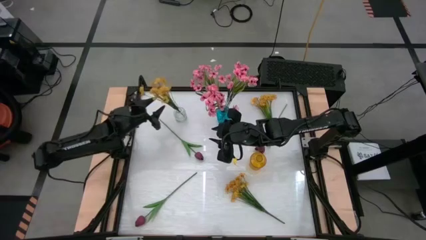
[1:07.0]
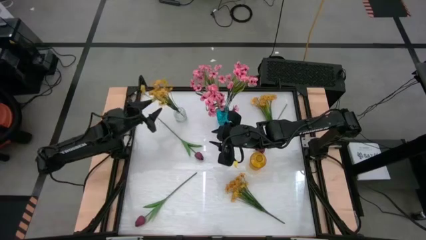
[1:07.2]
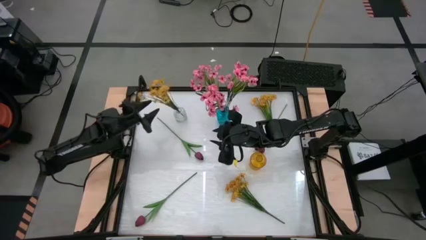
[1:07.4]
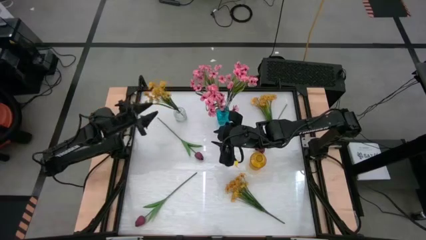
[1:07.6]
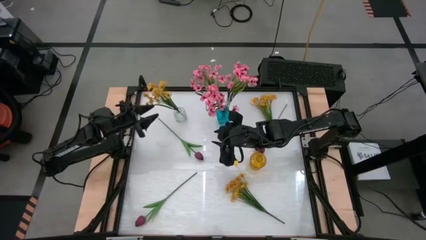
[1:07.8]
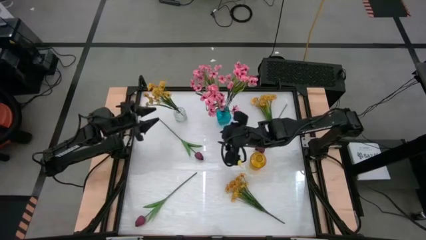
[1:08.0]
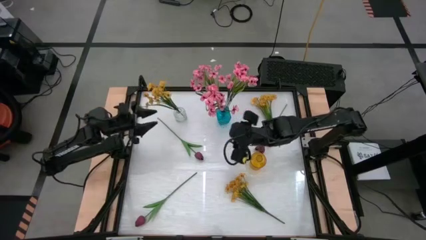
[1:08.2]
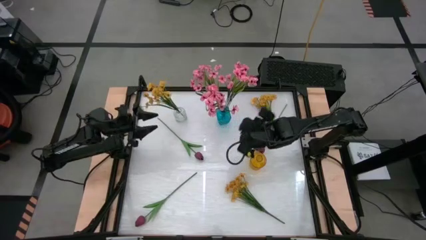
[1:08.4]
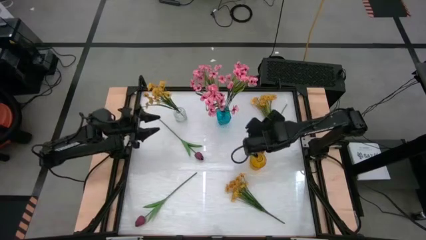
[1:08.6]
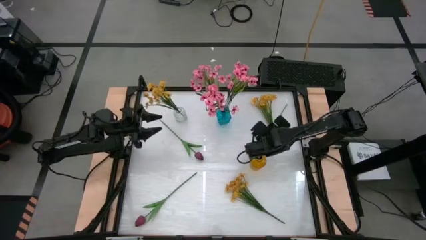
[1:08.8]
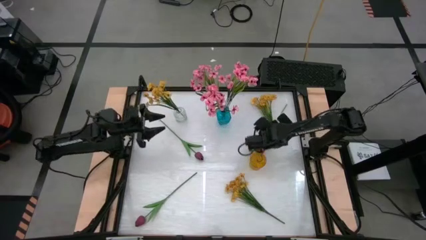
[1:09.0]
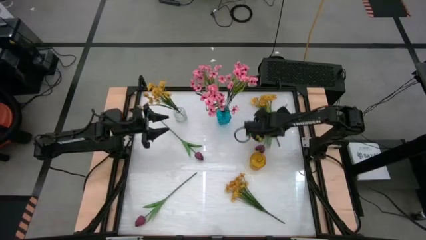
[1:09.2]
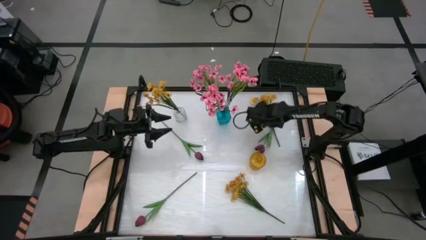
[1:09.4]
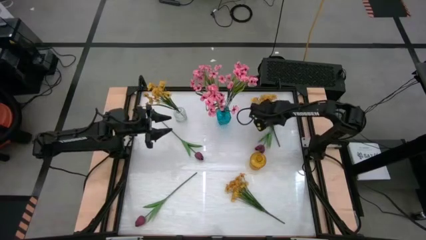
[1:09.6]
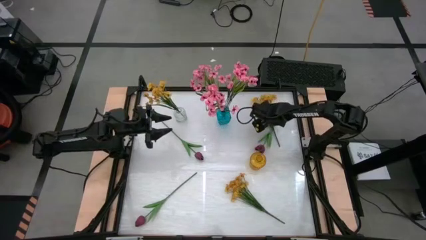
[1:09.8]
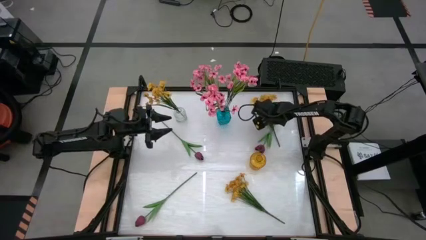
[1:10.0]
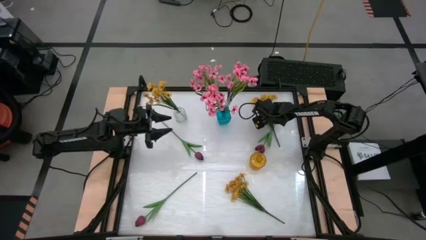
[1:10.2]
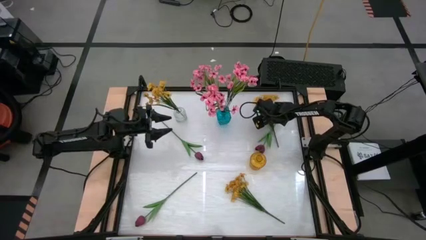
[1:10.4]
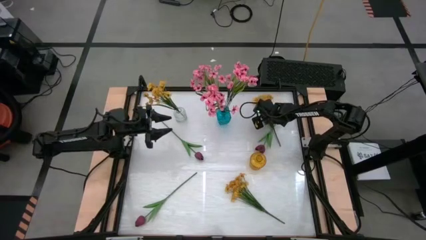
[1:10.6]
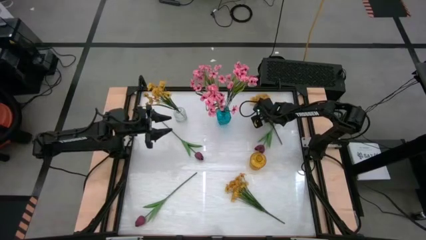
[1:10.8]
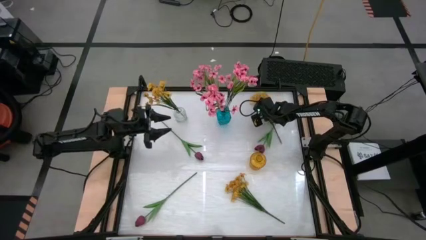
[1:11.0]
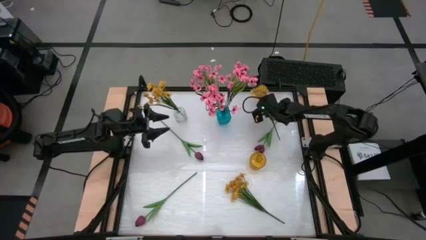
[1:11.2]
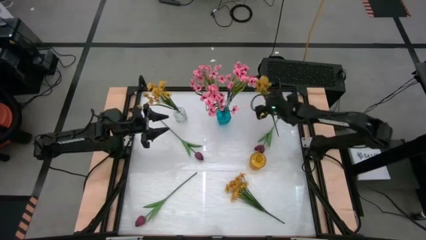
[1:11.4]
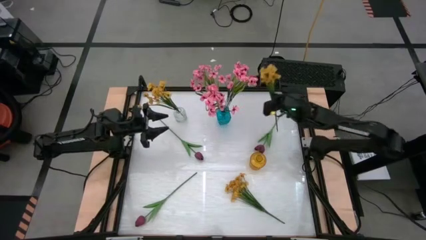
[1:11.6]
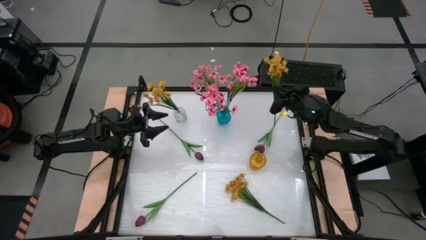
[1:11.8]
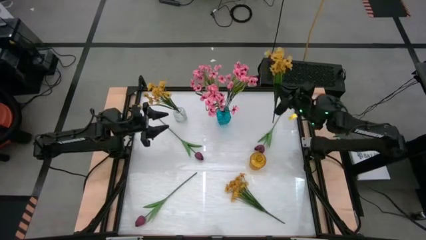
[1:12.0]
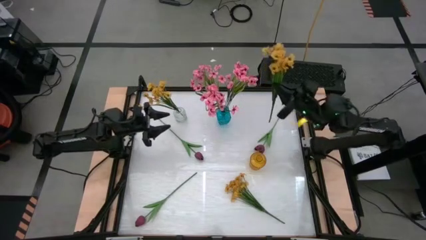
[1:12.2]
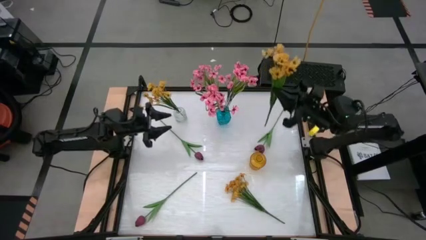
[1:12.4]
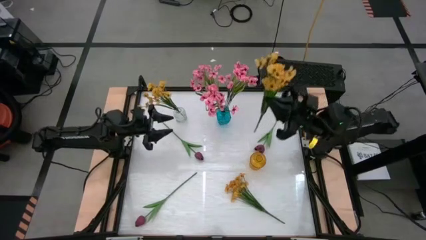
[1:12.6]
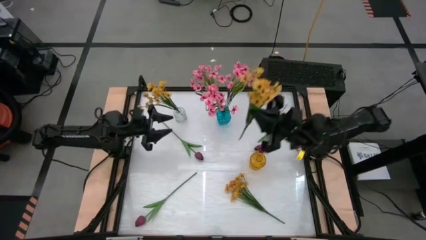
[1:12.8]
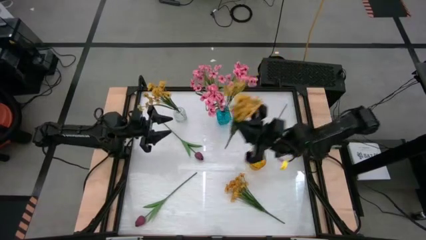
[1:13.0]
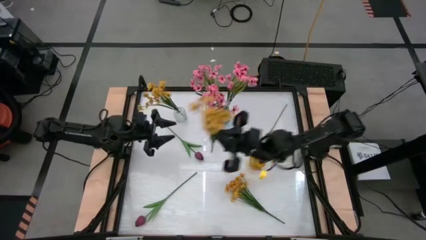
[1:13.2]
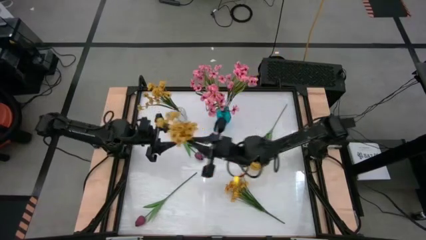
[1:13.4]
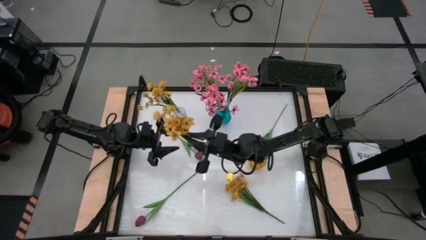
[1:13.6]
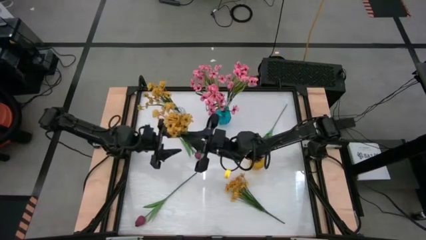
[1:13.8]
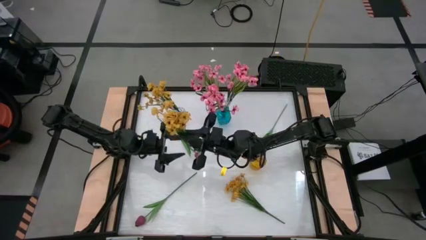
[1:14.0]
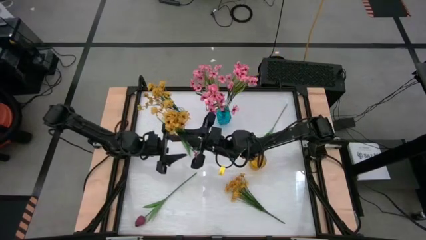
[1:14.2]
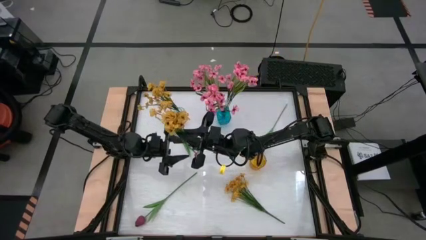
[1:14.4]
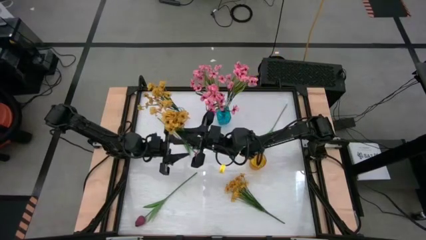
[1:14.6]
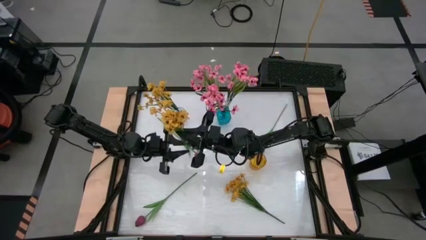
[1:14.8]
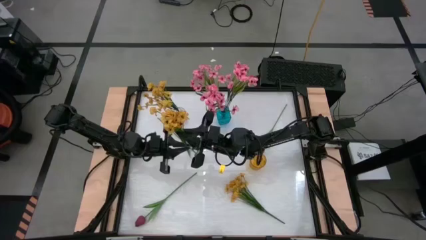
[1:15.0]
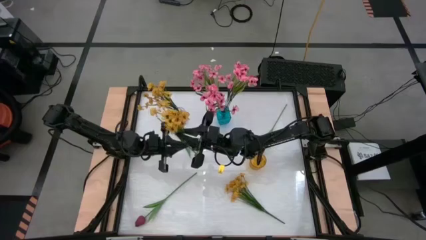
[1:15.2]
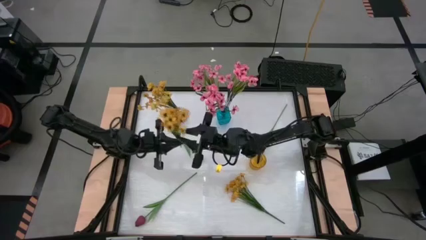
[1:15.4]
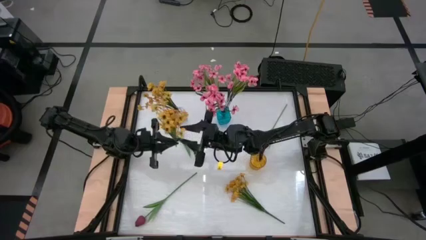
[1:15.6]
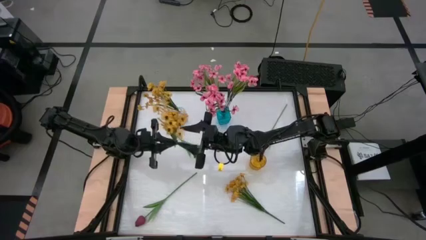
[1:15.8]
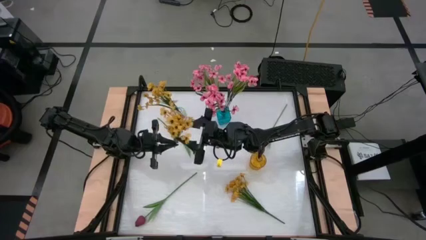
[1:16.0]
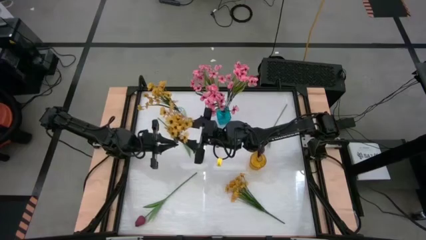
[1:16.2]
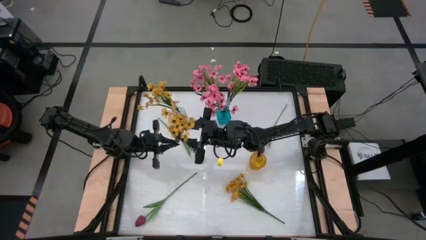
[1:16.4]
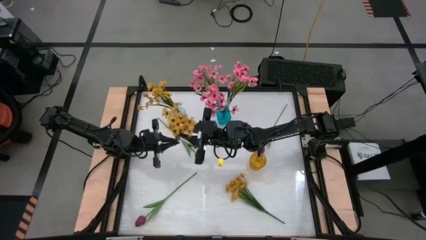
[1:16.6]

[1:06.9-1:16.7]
Task: Sort flowers into vase by color
Put the top yellow flowers into the transparent vase

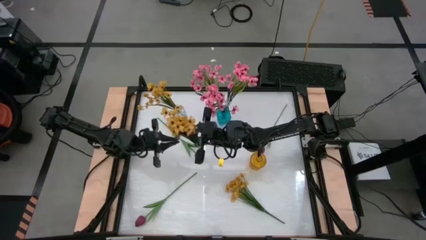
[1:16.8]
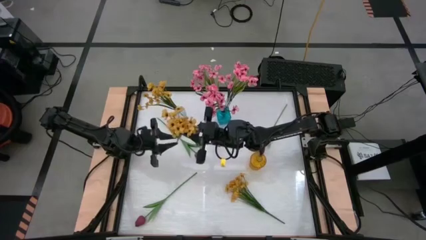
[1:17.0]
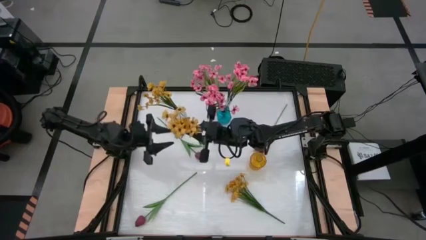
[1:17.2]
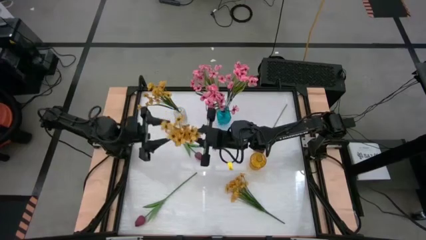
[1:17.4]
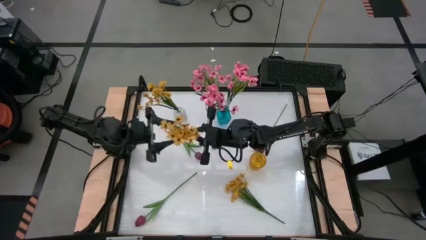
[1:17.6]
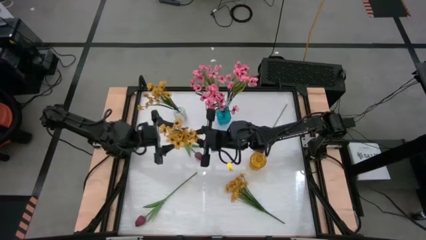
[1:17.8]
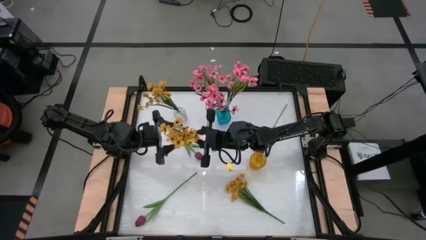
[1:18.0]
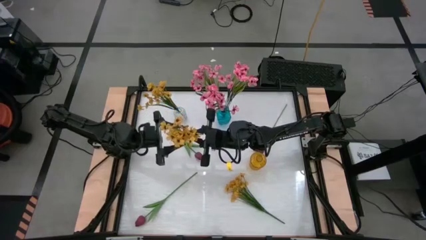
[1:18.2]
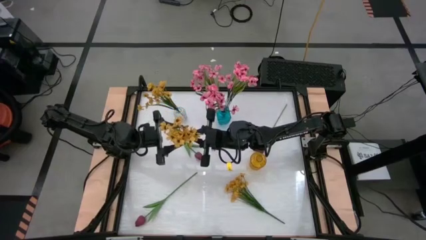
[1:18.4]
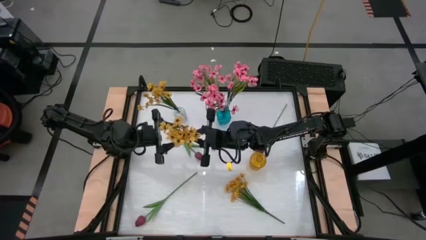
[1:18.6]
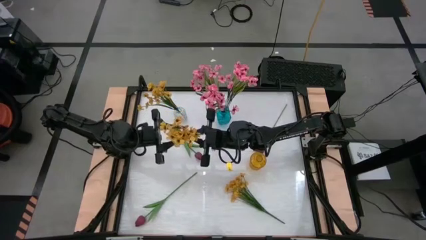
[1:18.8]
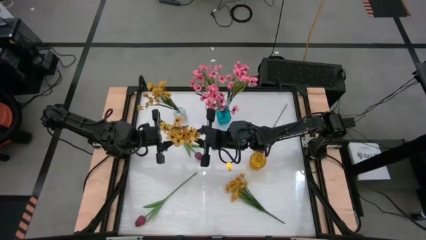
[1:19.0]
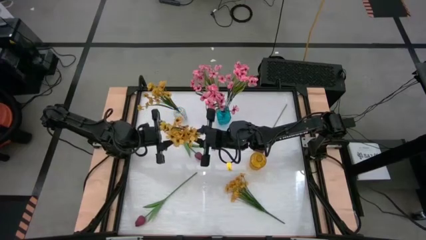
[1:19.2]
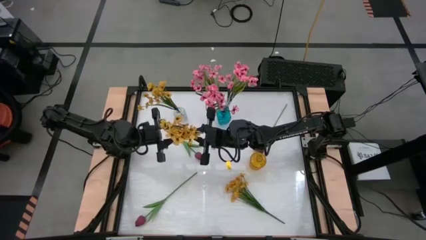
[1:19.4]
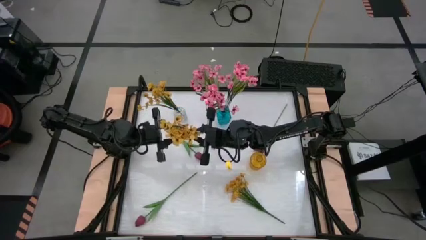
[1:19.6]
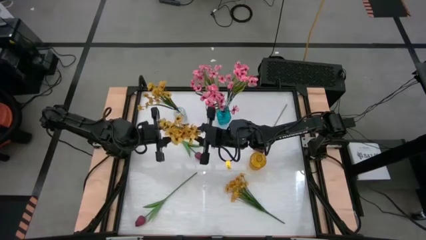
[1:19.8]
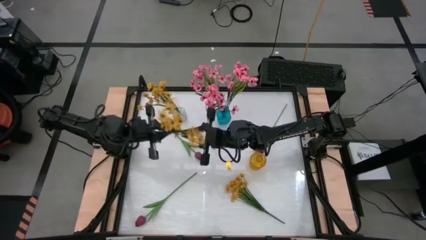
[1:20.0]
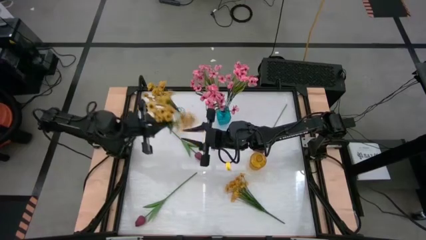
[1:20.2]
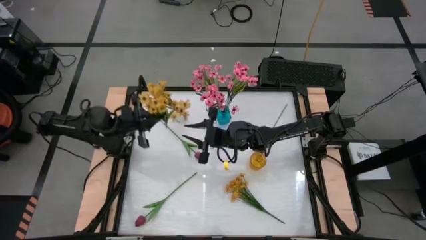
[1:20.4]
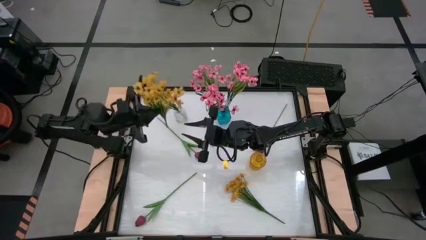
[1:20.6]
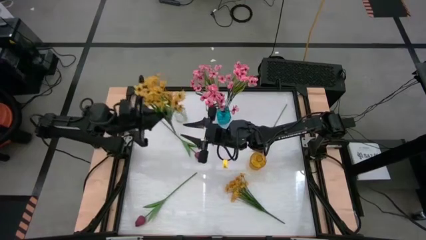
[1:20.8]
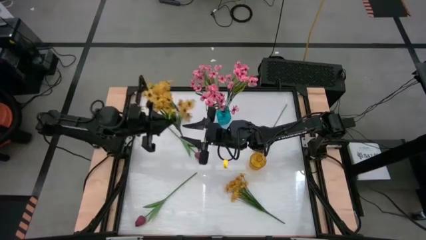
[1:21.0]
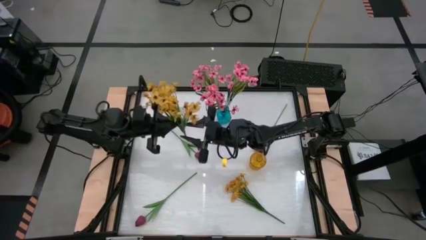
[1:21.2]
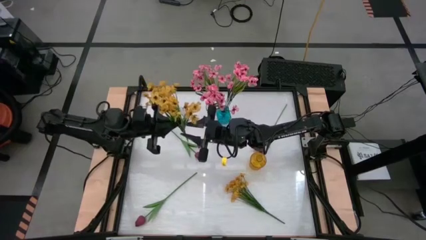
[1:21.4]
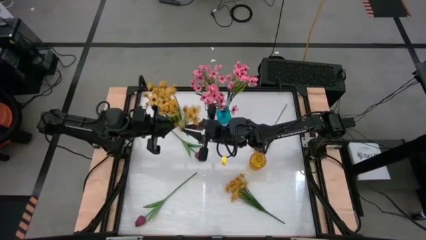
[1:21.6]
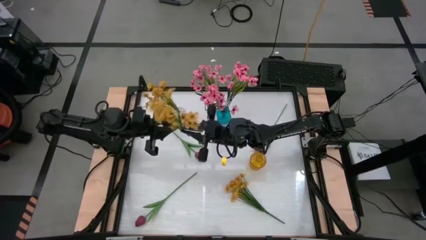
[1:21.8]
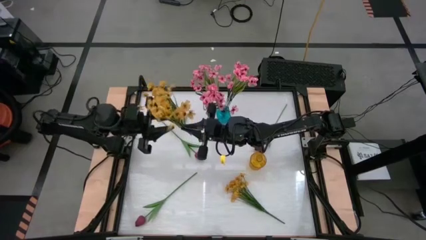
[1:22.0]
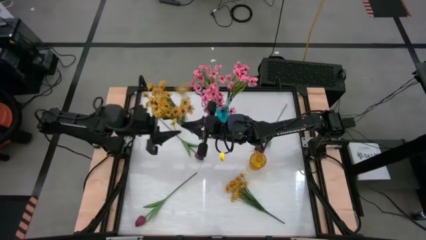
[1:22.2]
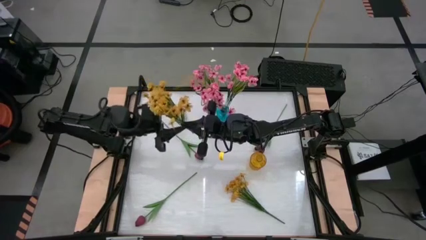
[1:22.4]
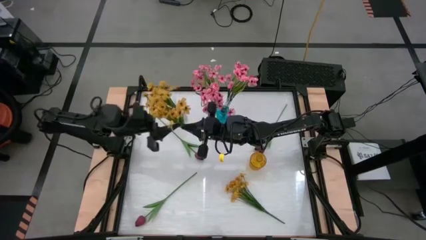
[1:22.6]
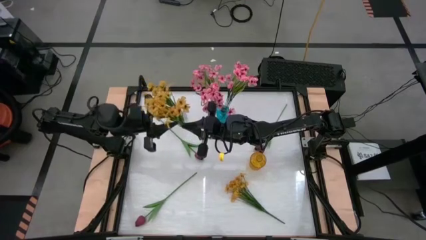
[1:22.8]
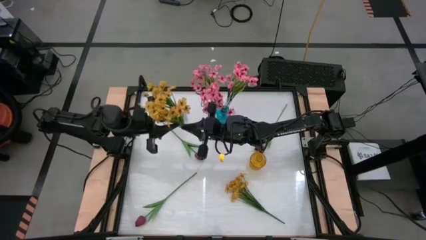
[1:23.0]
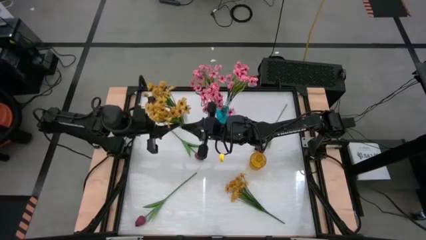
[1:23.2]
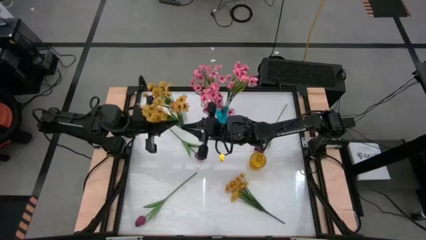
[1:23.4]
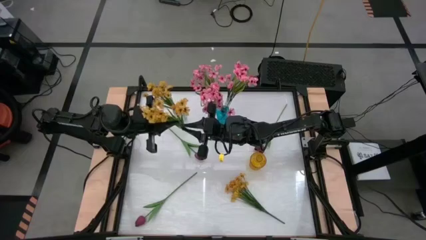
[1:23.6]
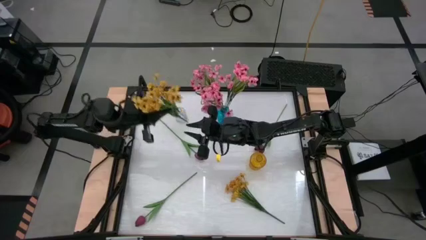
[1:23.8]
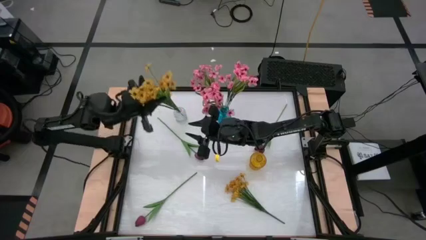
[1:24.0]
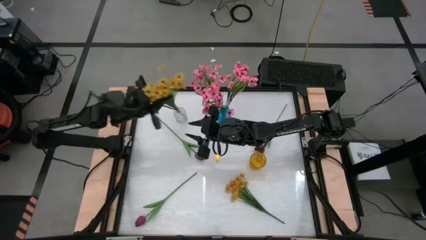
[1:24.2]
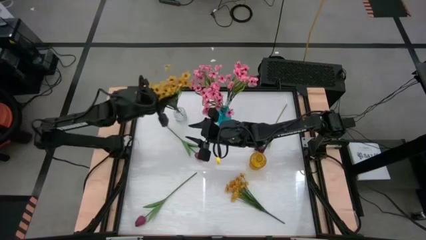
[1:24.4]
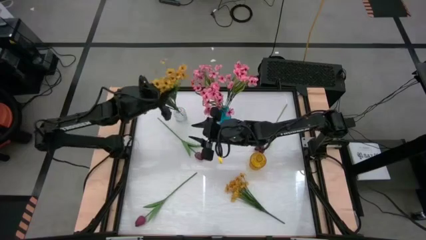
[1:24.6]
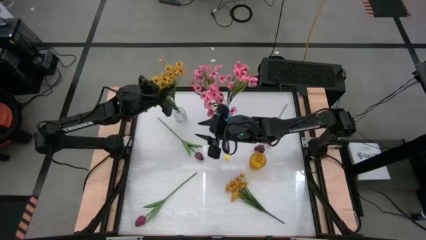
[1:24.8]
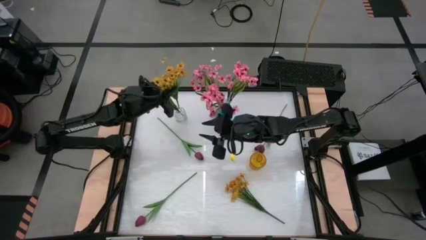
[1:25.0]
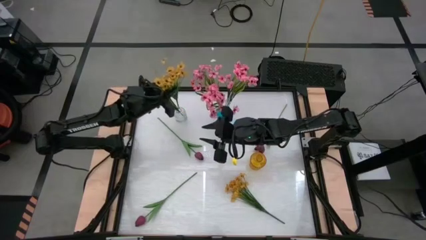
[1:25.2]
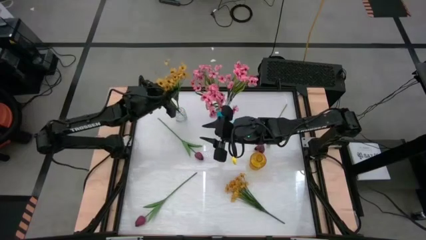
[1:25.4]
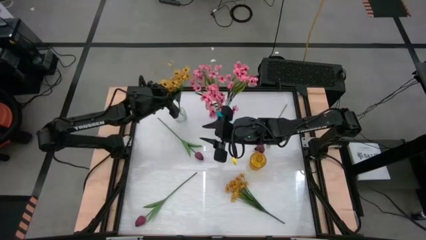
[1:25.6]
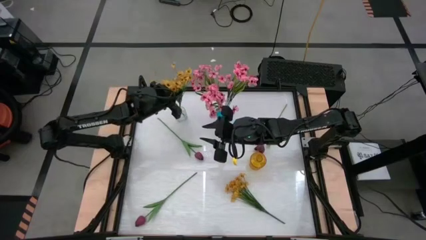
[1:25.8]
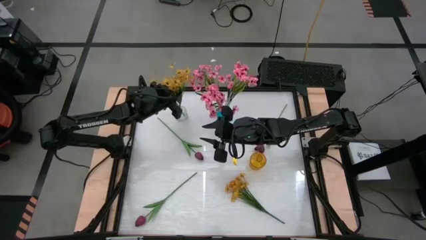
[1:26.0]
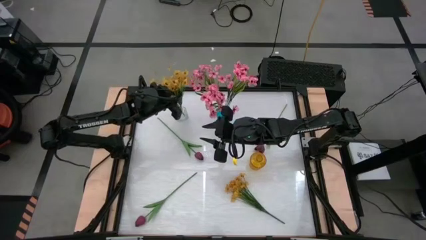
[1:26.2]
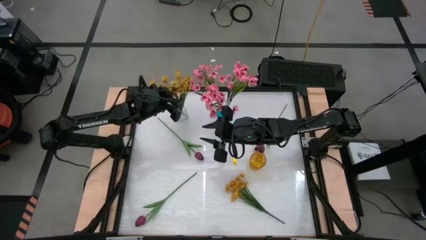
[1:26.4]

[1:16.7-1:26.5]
Put the top yellow flowers into the transparent vase
